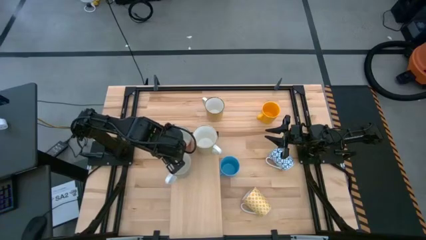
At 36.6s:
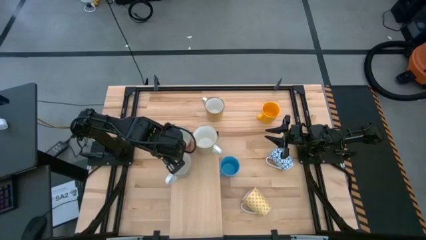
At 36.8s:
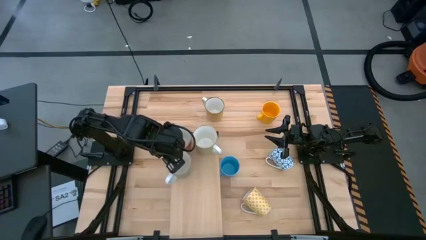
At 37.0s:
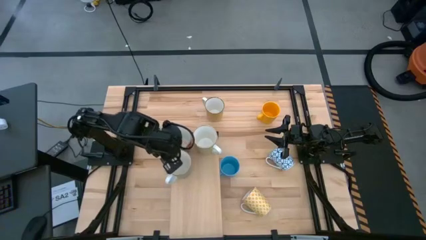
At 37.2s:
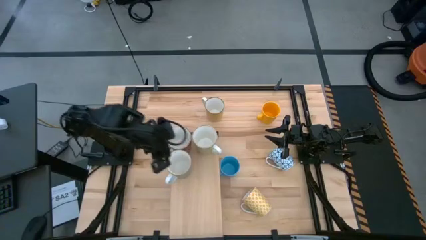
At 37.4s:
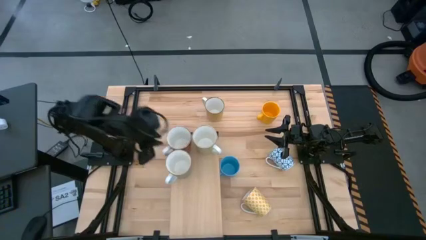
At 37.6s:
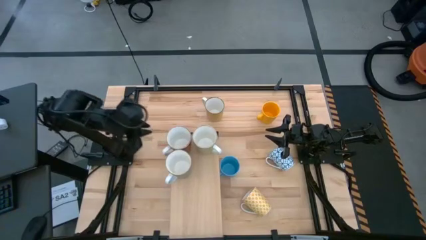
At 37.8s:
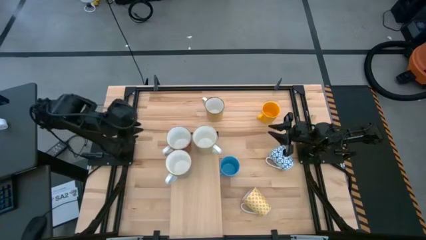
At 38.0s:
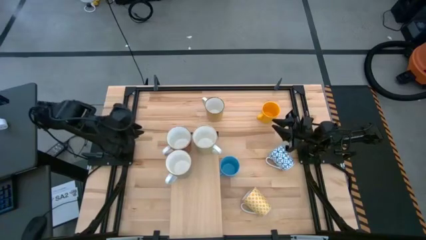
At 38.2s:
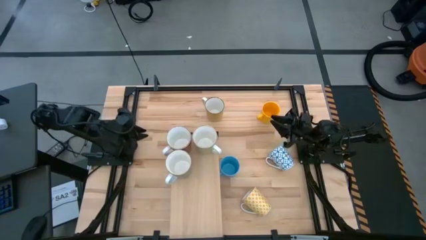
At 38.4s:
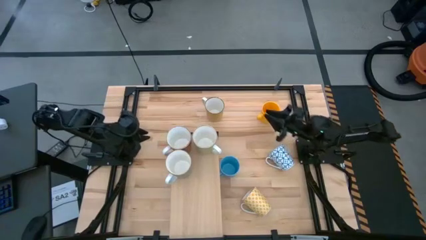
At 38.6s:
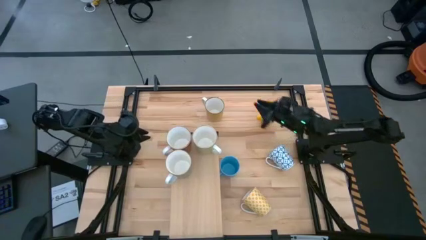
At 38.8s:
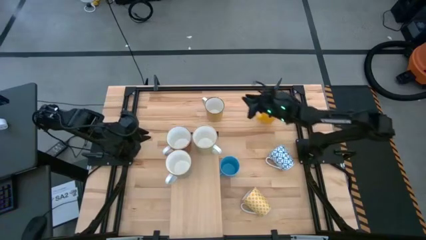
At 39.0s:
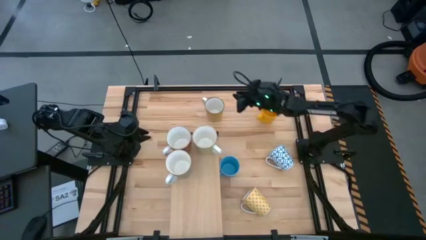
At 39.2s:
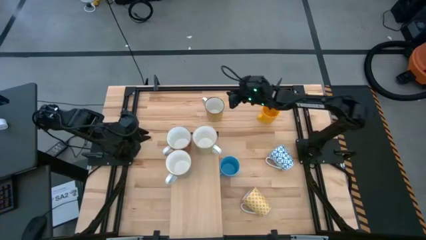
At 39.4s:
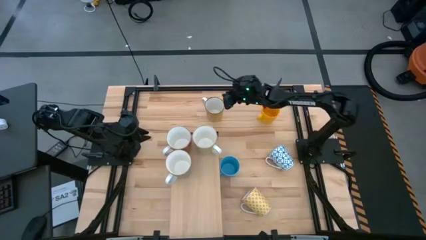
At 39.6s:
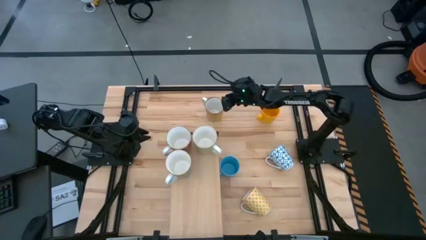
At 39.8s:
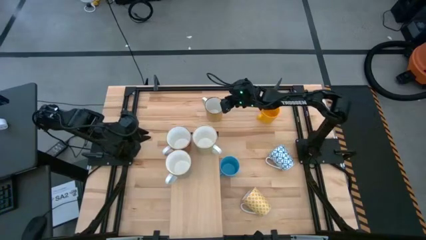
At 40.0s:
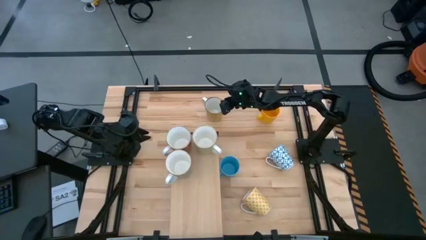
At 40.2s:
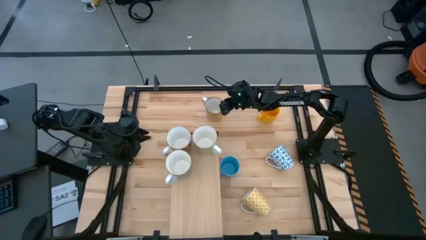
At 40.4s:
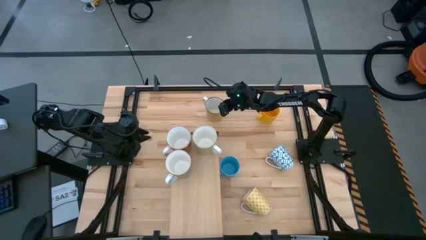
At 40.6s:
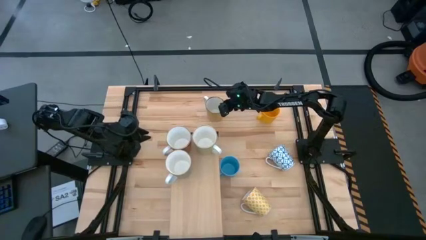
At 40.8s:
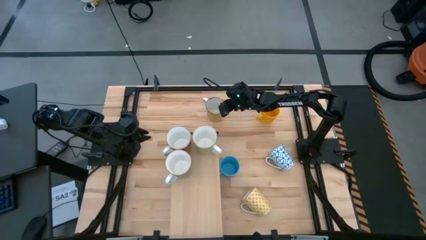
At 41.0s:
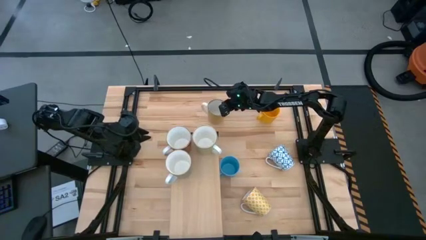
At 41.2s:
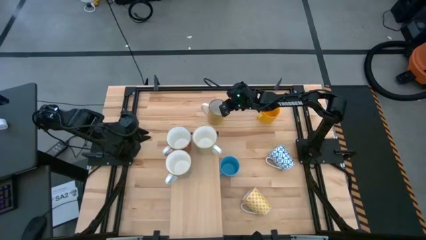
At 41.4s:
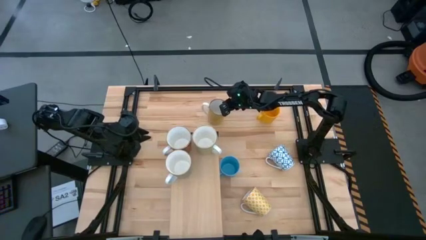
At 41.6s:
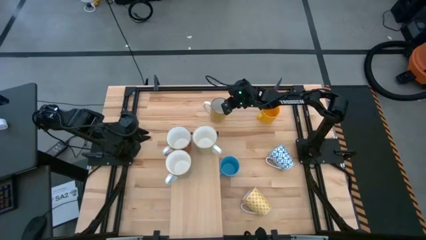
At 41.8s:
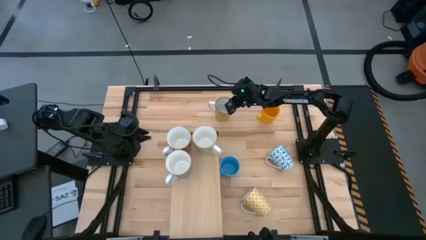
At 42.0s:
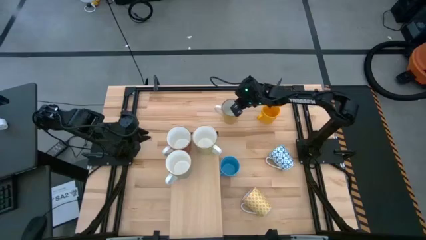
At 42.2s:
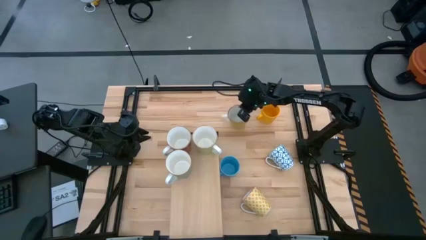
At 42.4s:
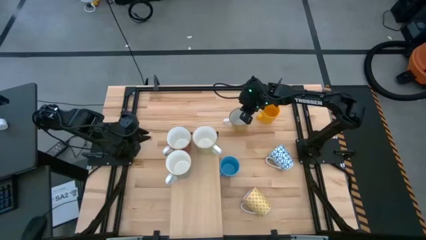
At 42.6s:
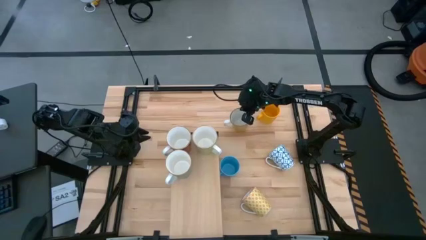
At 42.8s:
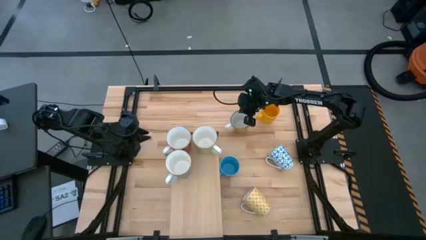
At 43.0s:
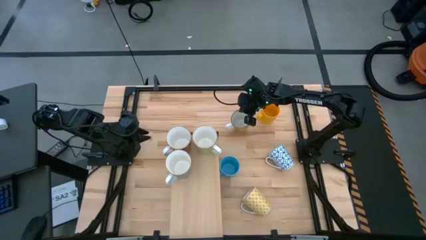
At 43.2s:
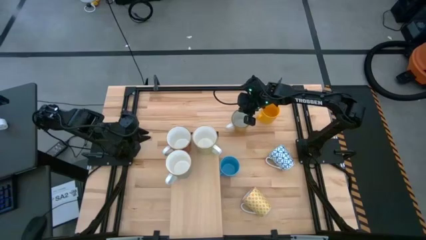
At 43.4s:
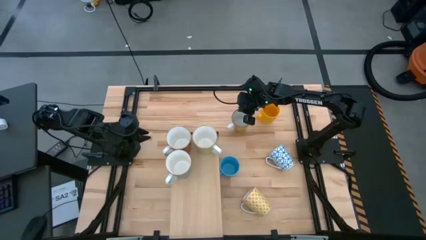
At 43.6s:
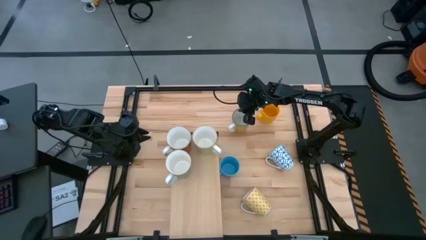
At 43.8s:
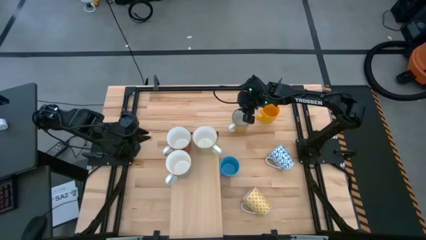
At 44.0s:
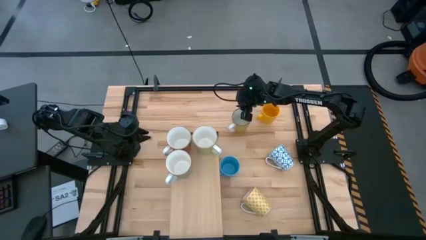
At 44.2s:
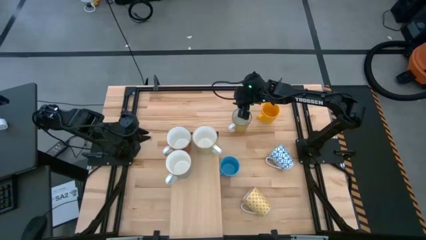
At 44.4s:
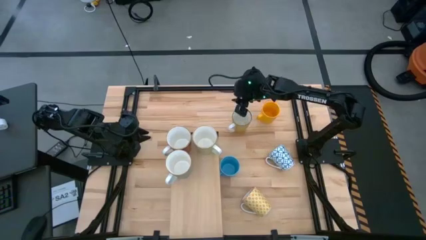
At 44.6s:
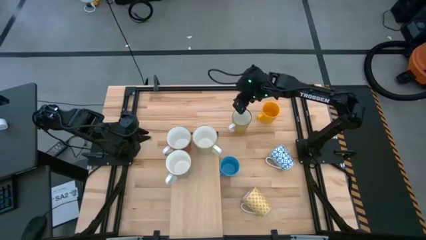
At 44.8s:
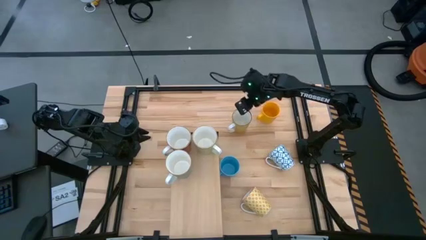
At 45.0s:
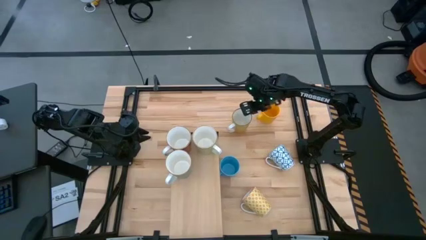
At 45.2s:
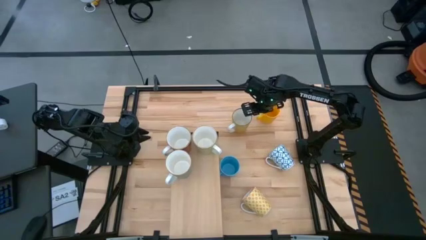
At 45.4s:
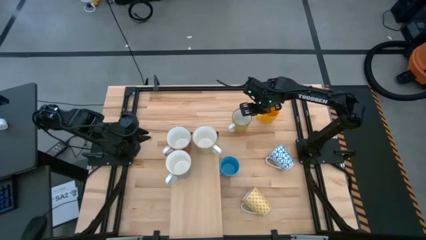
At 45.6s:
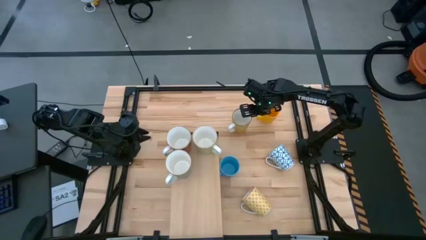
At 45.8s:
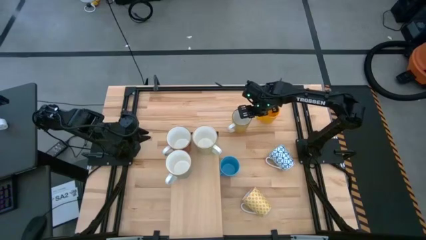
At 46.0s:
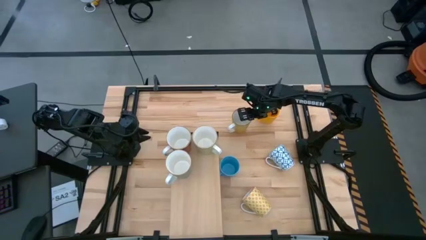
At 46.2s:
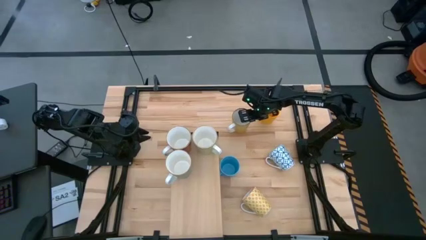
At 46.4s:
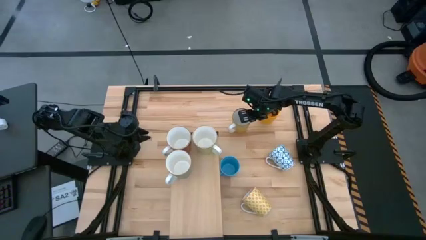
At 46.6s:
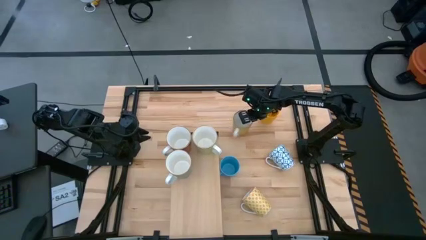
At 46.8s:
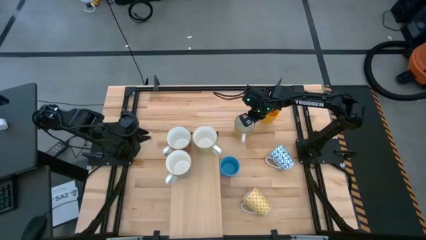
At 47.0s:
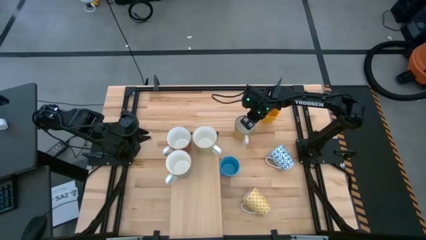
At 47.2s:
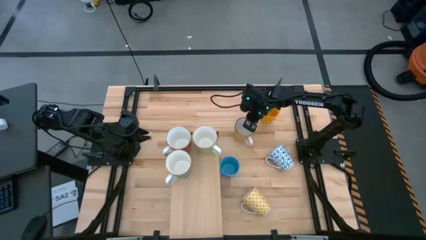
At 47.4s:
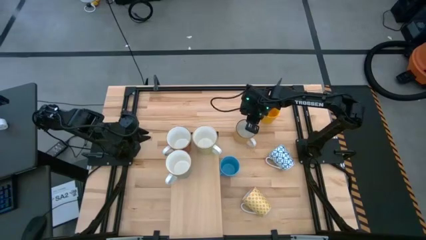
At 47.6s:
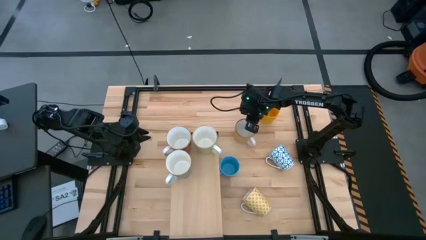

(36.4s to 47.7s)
Task: Place coffee mugs
Put the left yellow mug on the shelf aligned with the green mug

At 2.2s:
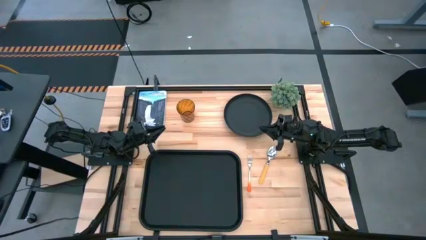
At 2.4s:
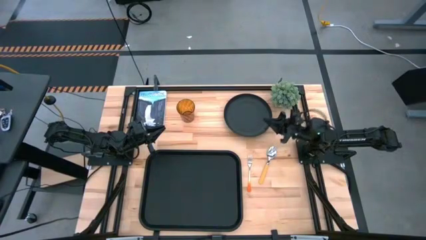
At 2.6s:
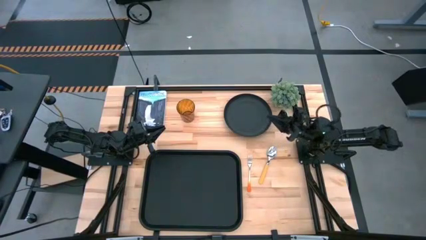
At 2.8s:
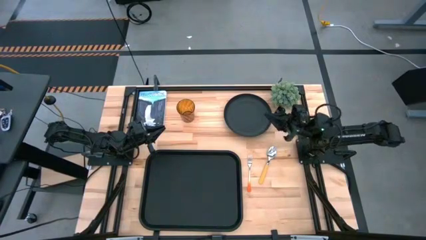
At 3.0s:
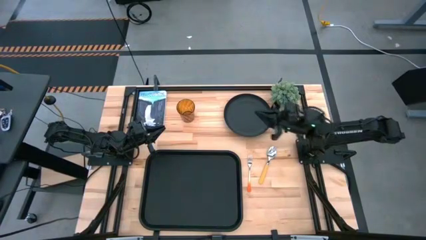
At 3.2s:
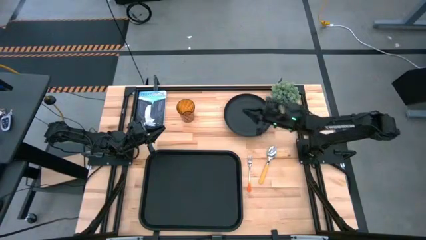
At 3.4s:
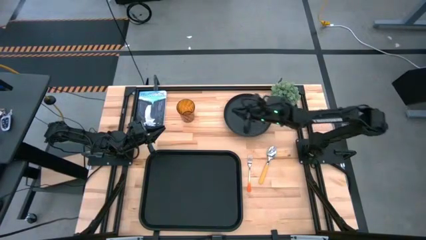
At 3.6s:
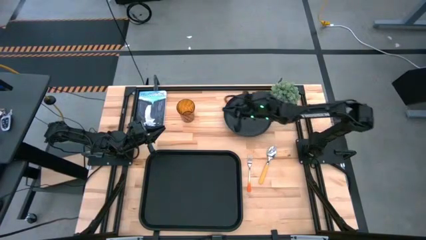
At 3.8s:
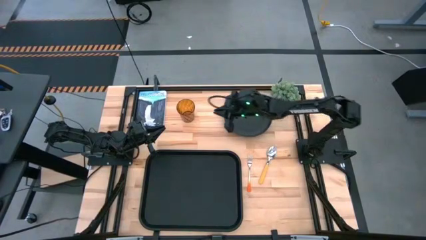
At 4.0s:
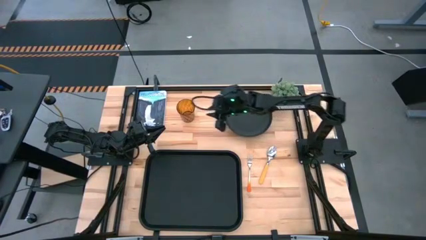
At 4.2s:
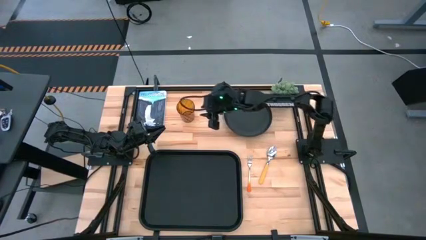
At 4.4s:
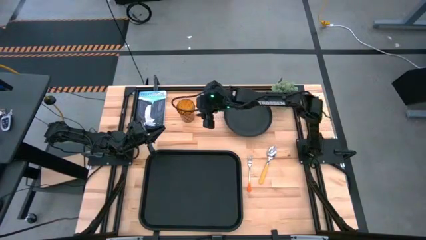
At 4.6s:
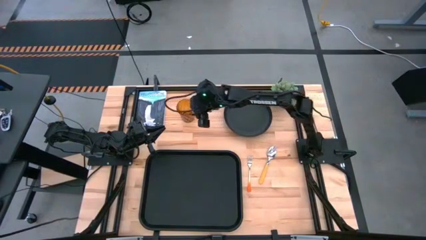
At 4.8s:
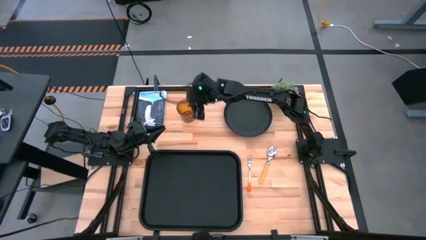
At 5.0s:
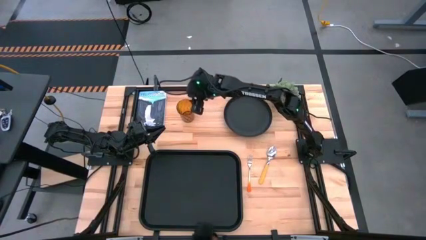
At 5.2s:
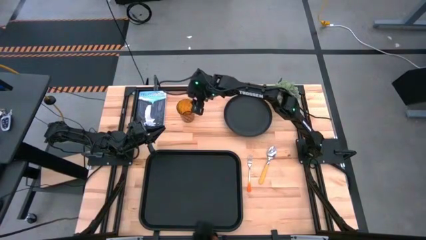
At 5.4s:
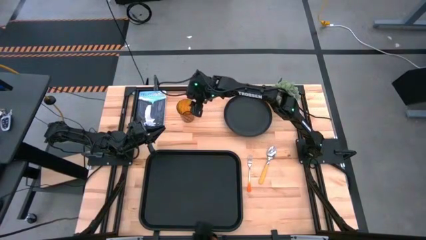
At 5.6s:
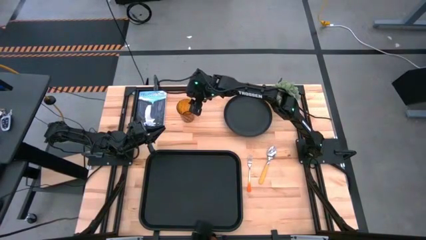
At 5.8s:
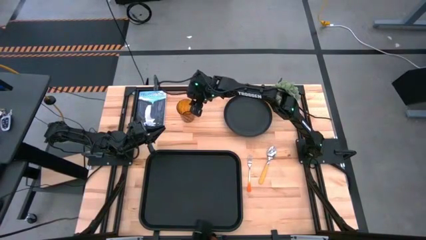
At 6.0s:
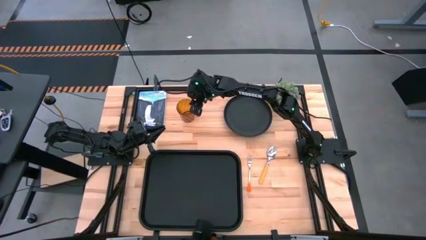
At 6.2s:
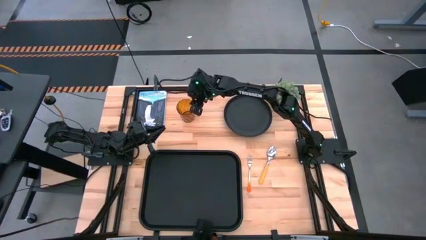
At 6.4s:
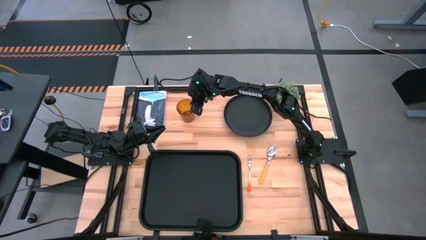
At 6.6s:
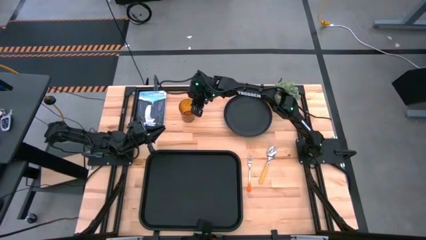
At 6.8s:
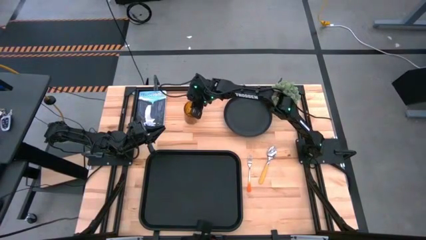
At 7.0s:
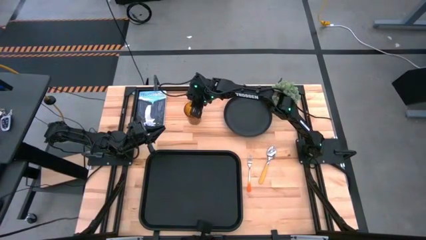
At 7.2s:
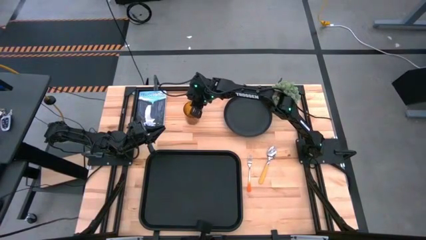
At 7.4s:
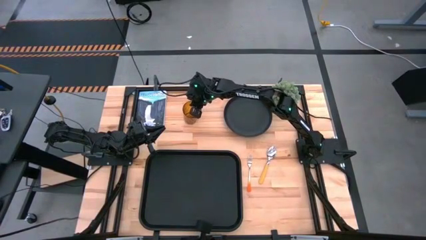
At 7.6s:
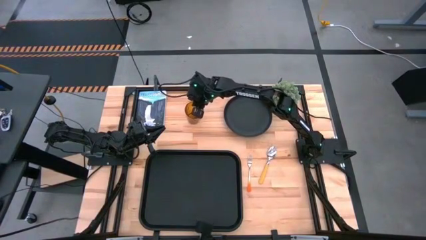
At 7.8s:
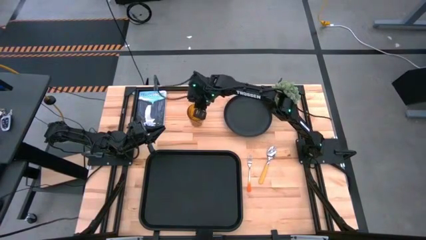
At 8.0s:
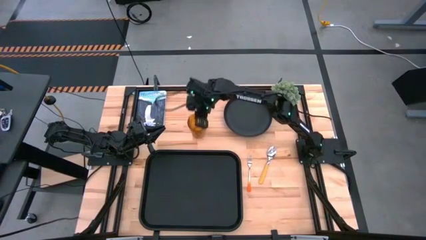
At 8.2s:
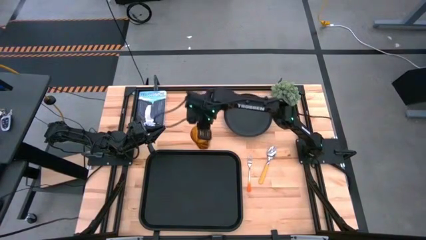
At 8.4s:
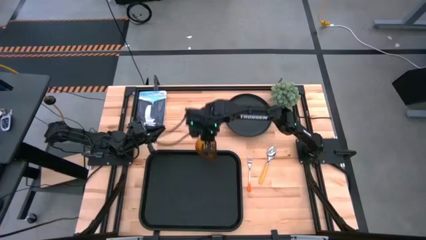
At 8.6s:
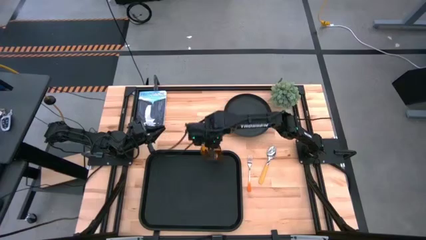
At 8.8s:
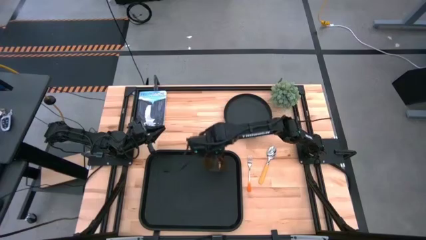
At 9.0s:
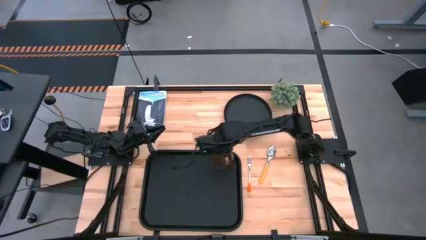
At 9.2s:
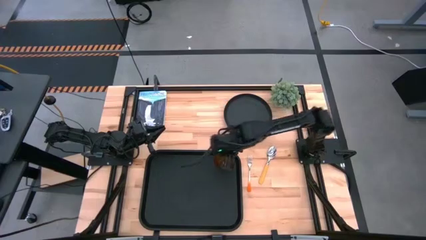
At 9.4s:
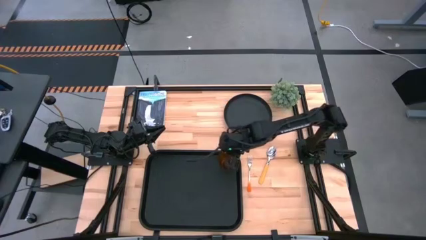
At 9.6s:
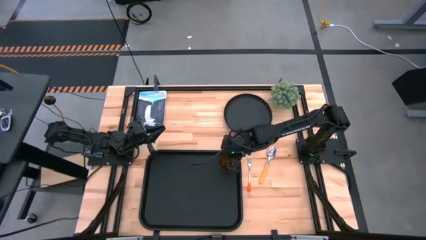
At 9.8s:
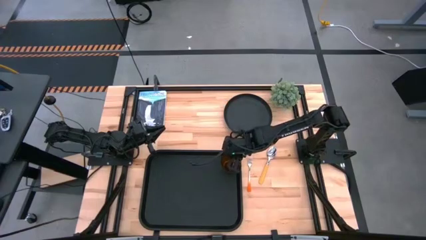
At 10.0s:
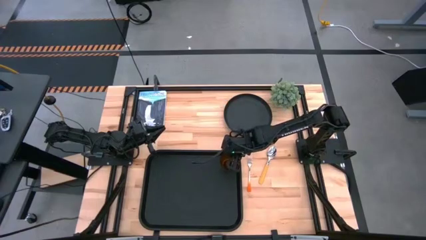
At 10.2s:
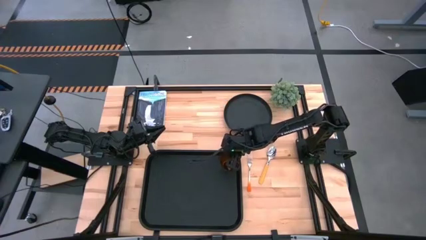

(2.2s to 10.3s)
Task: Pick and place plate/cup/fork/spoon on tray
Put the brown cup on the black serving tray
